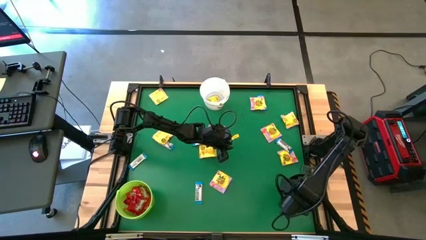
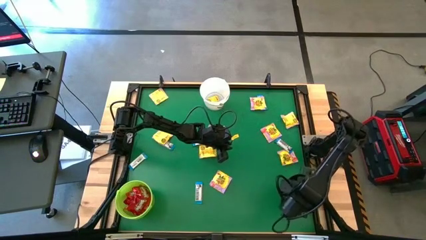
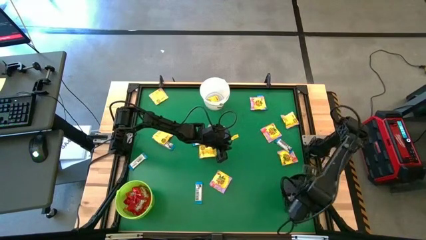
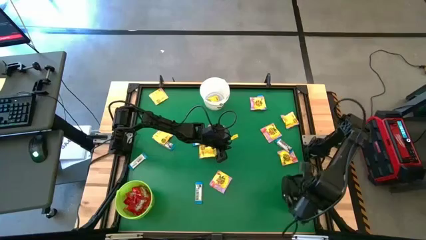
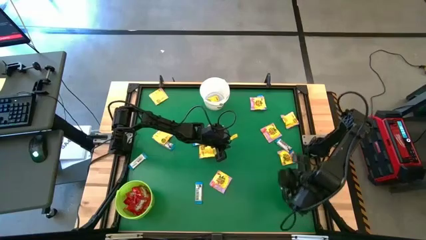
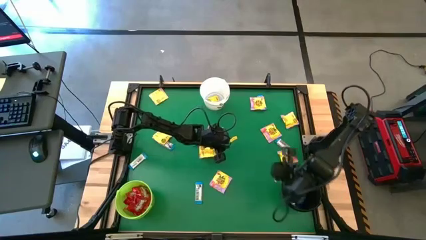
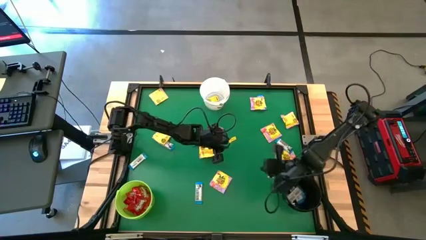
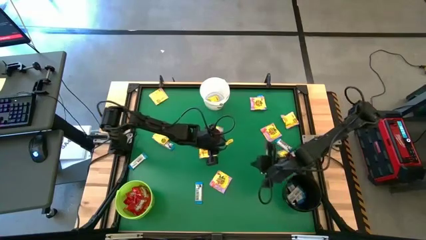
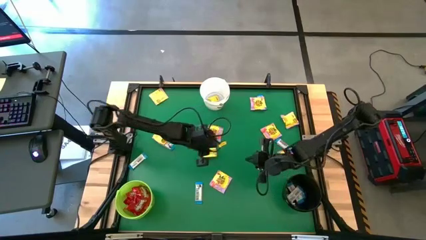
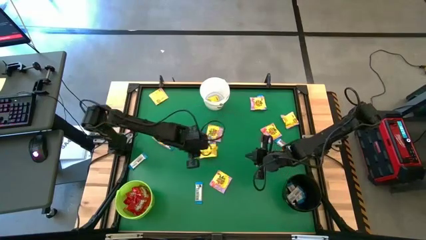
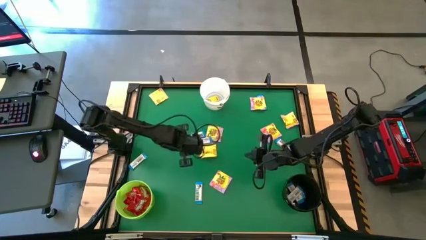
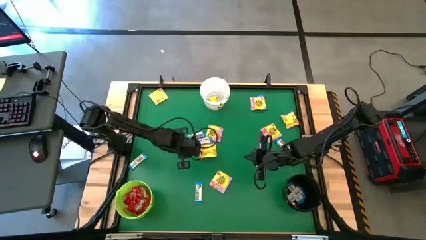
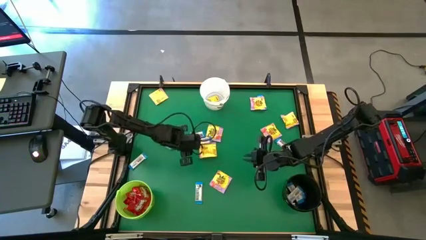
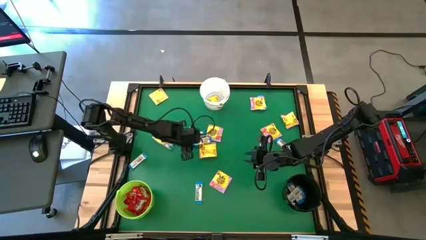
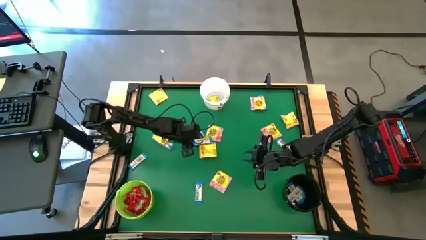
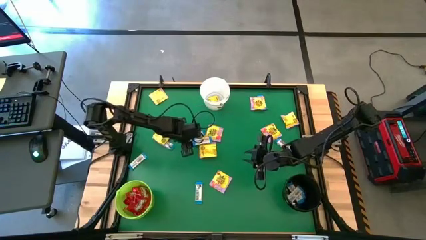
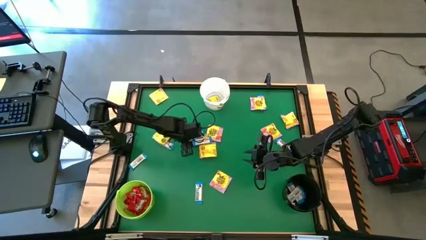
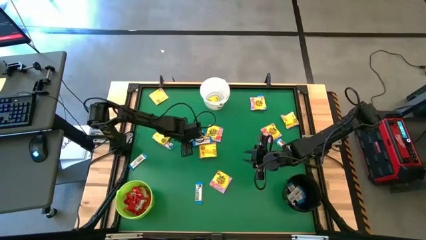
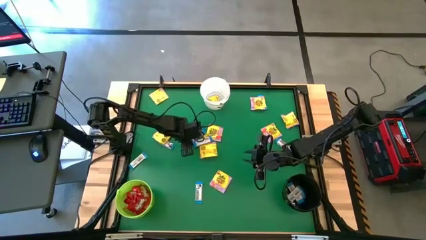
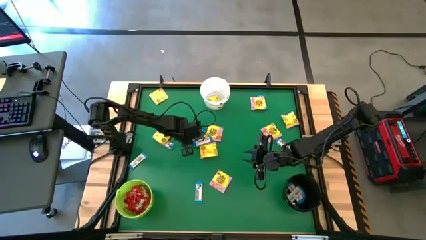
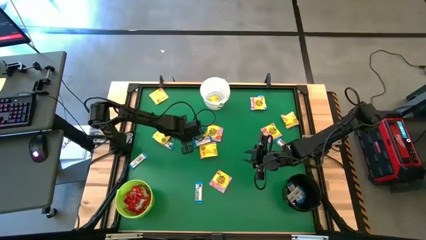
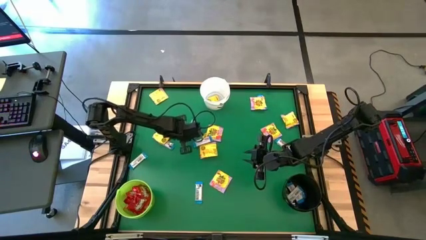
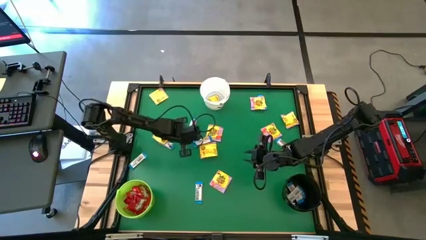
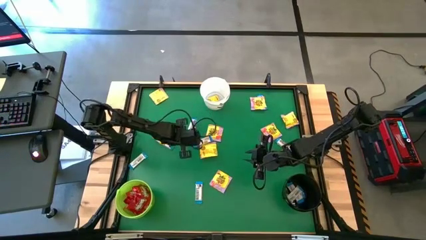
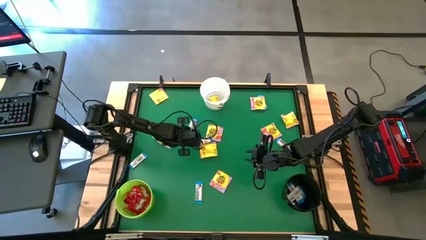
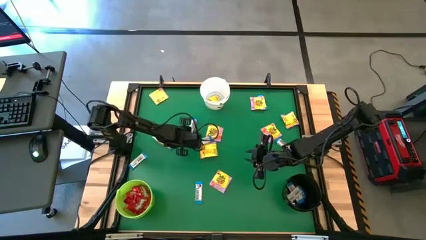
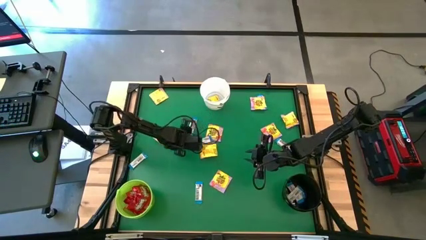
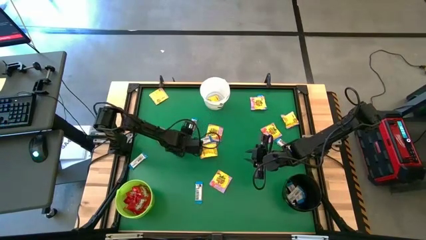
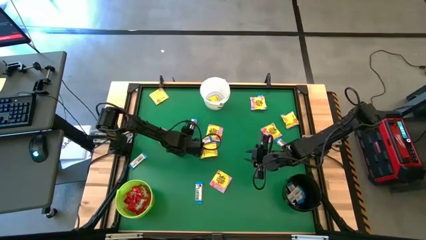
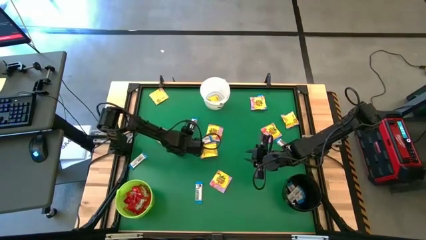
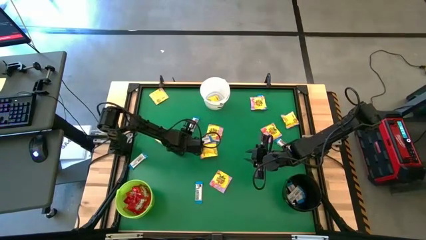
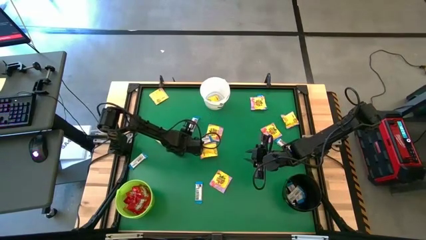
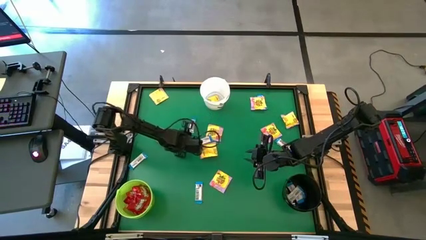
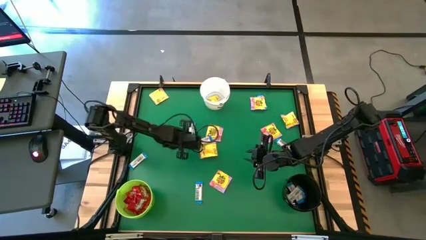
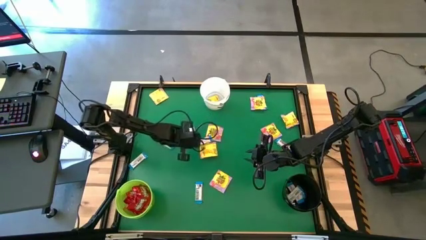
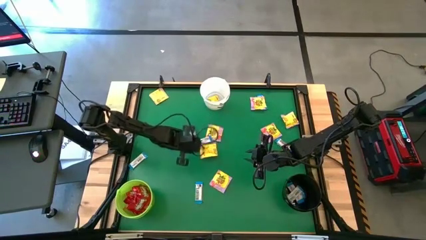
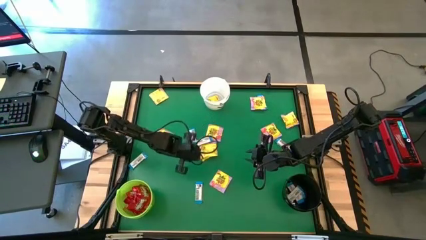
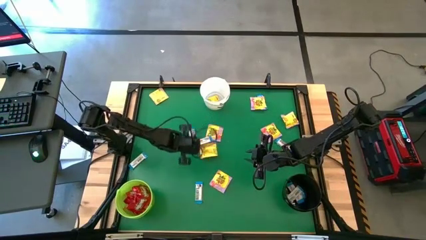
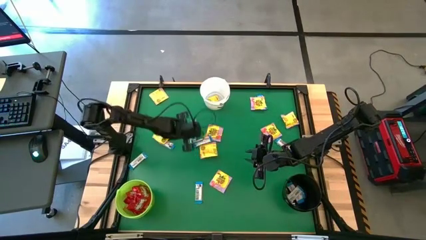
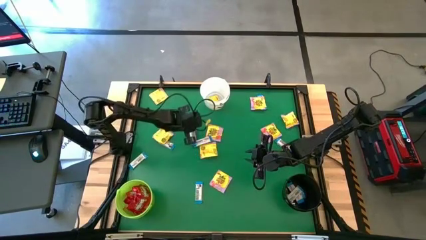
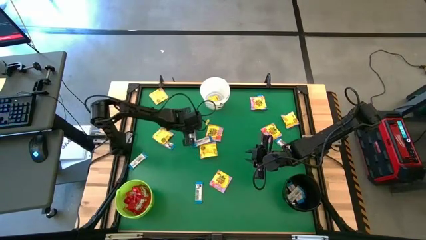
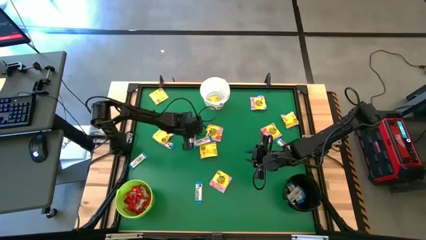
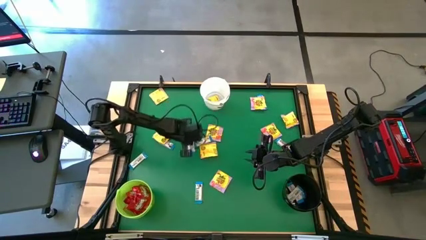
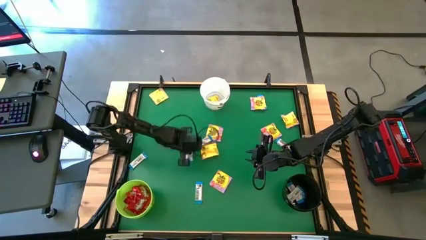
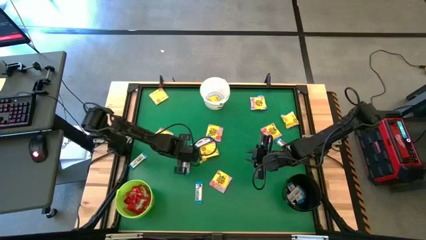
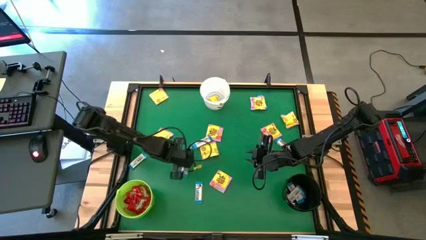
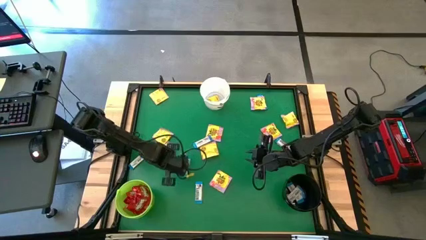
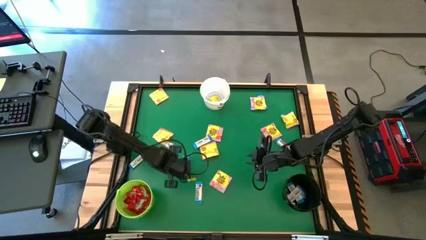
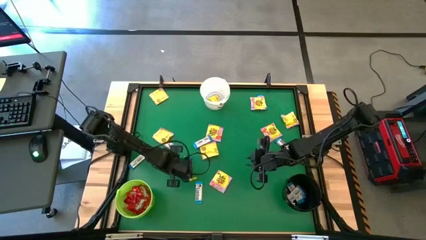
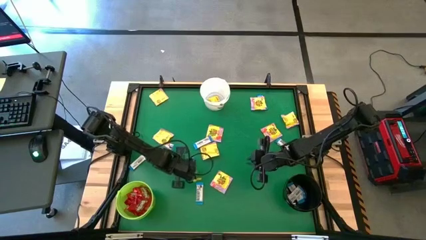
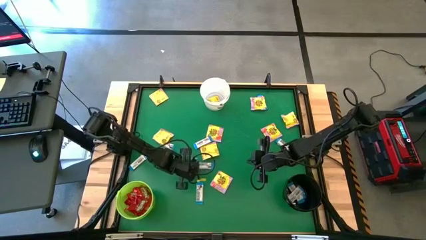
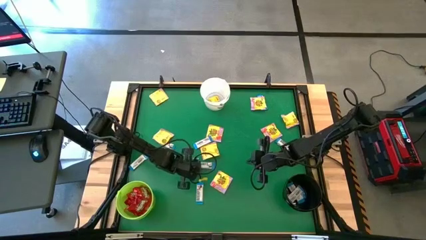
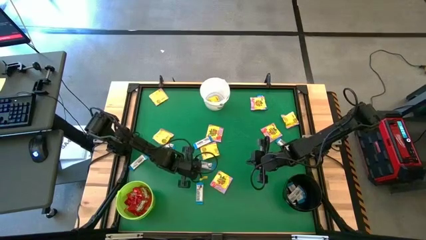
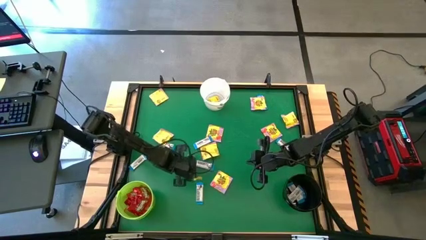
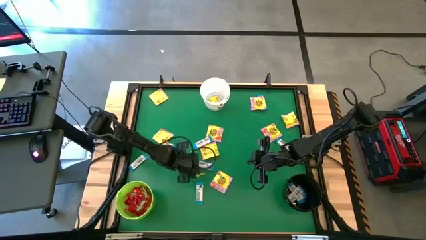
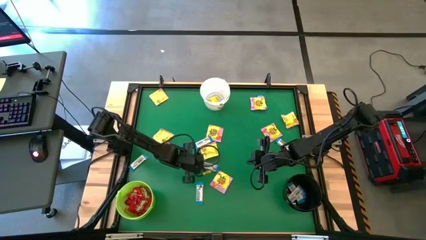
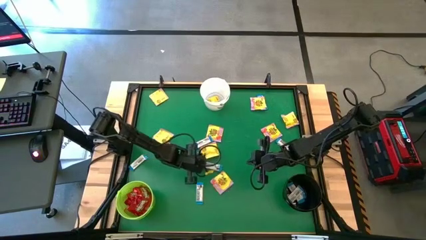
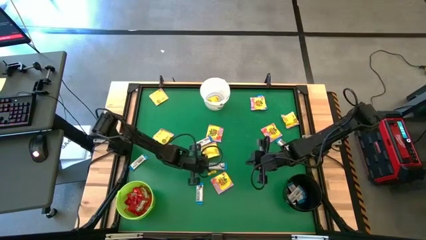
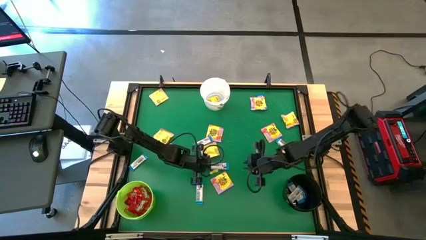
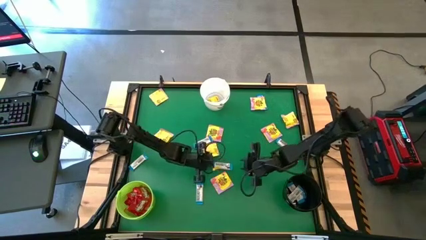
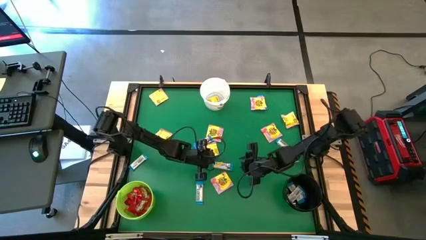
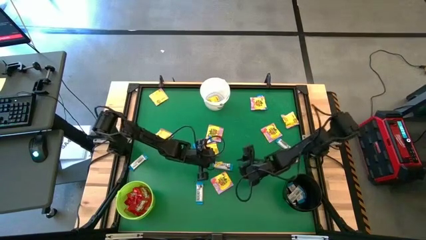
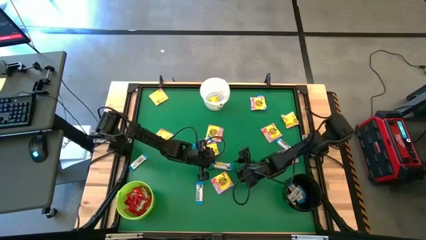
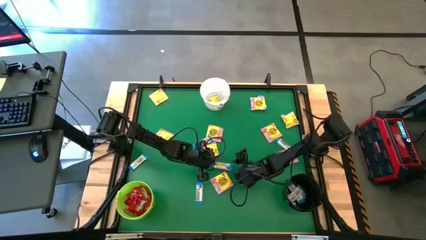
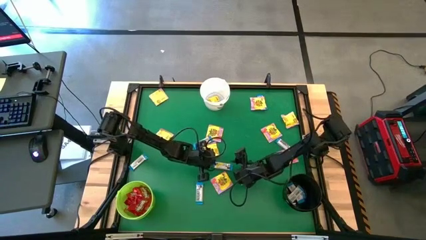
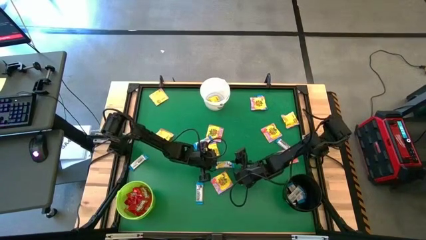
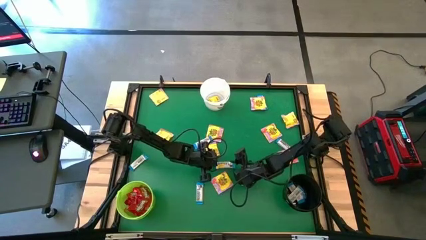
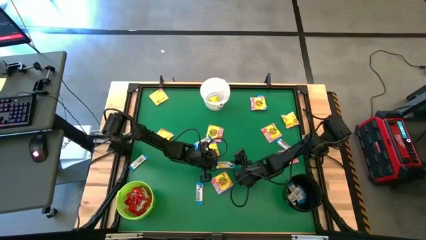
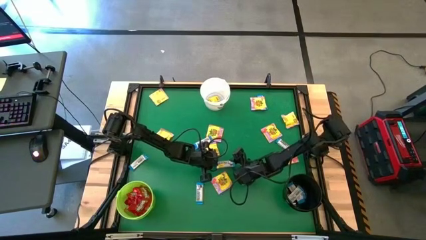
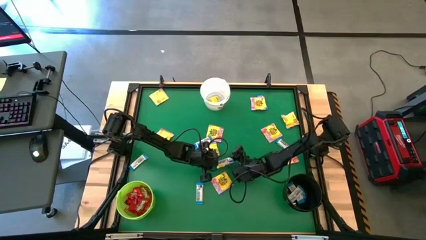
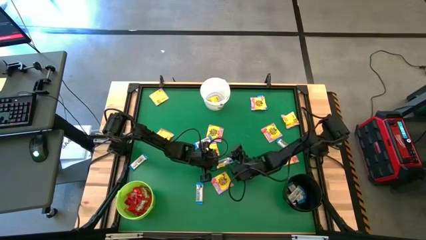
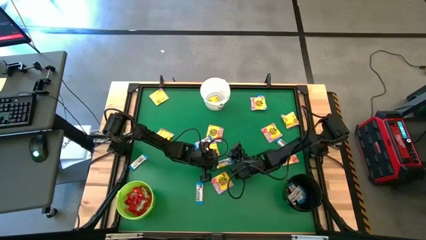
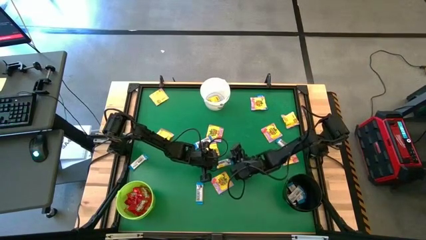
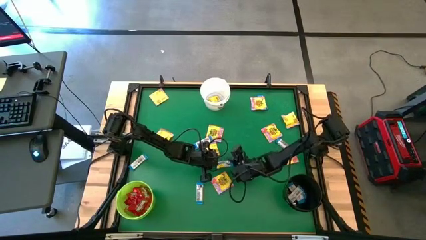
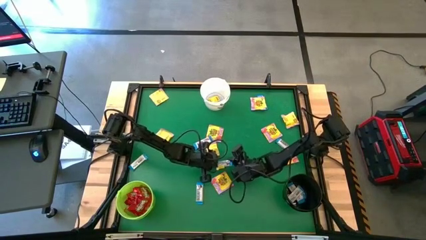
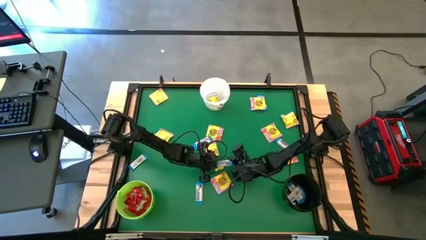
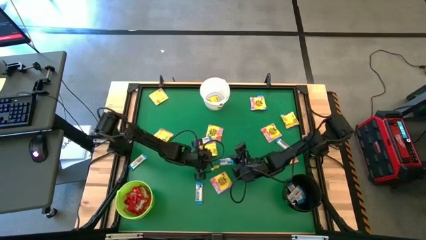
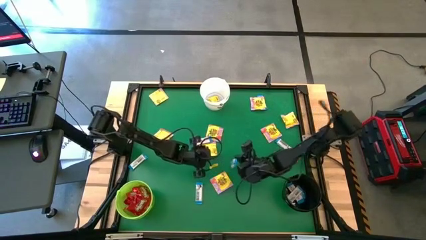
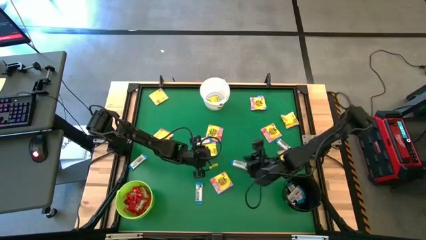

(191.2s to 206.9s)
Task: Sort candy by brand, put in halloween buckets
Put the white candy into the black bucket

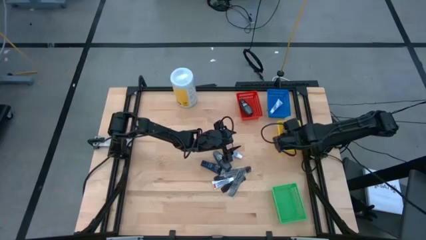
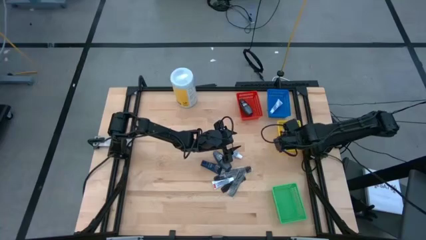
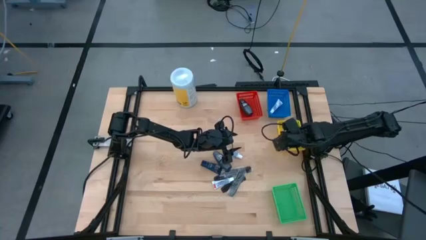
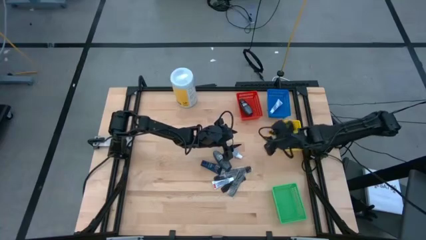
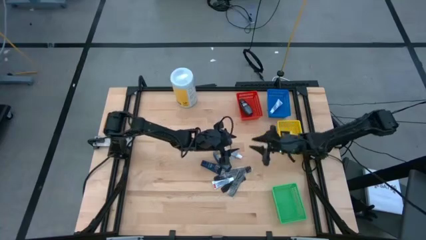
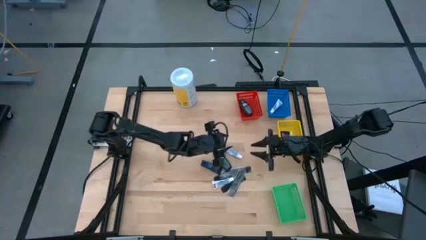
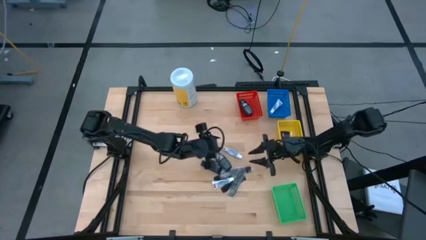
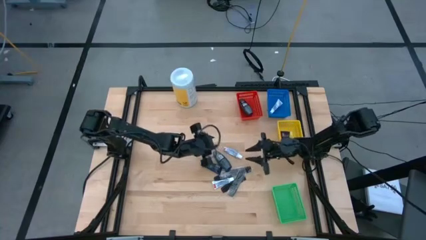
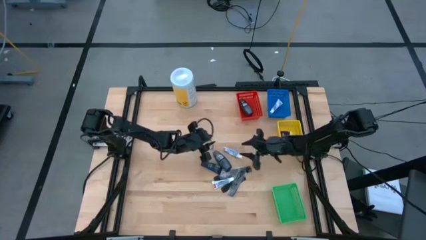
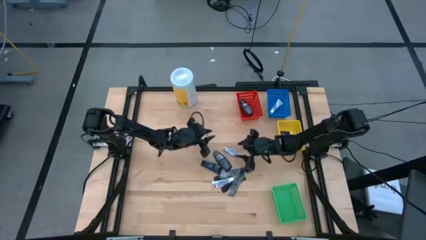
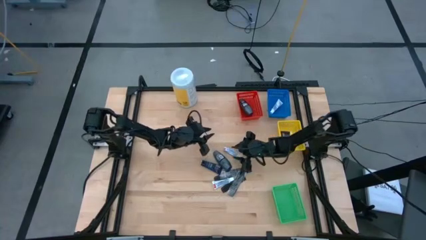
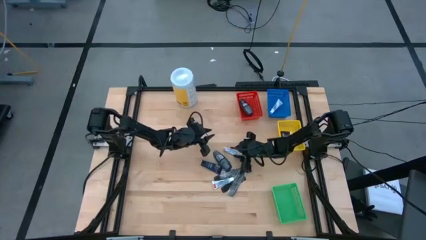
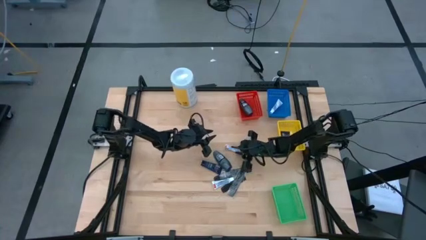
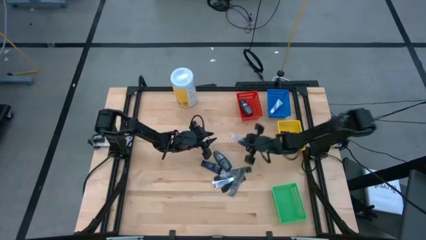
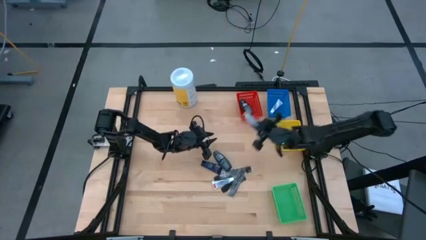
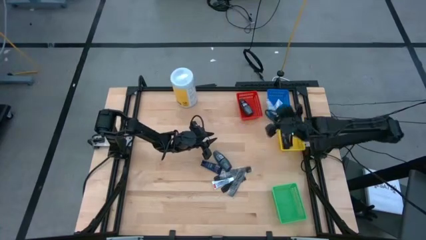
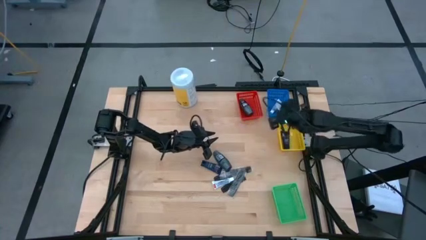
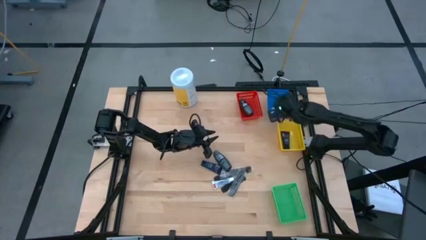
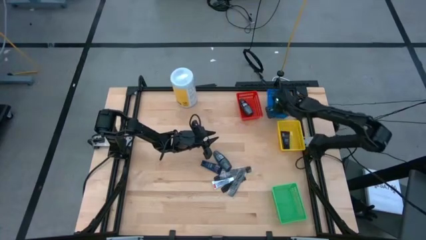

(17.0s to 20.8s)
Task: Pick & Place Travel size toiletries
Put the white toothpaste into the blue bin
